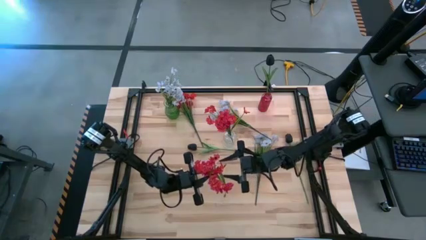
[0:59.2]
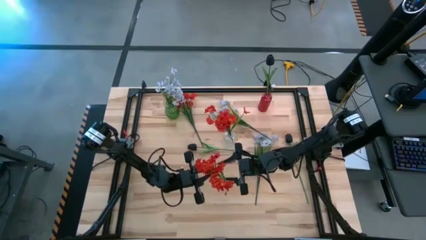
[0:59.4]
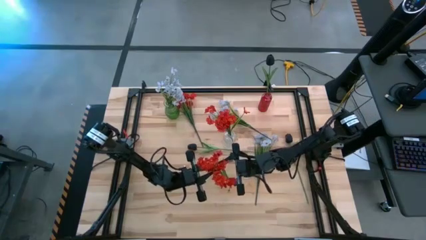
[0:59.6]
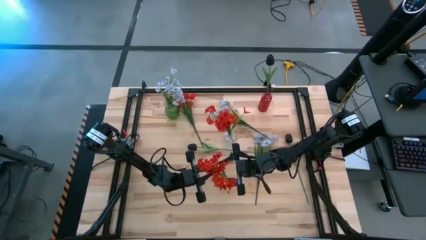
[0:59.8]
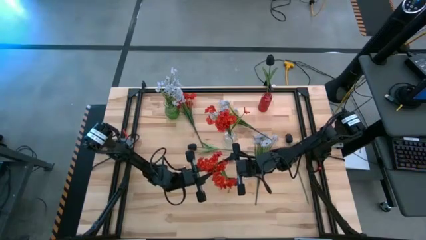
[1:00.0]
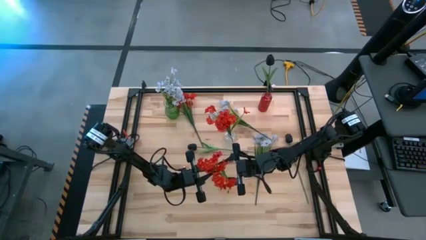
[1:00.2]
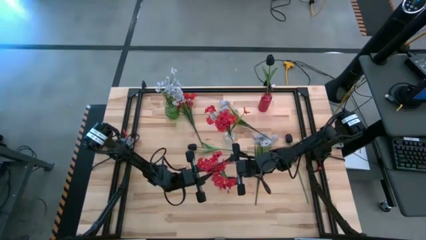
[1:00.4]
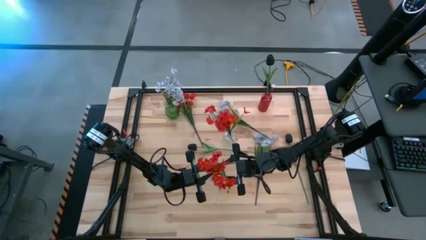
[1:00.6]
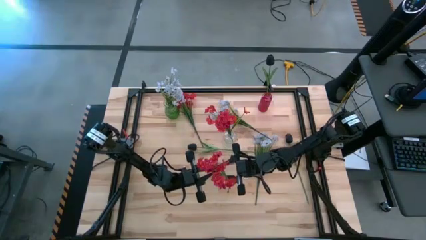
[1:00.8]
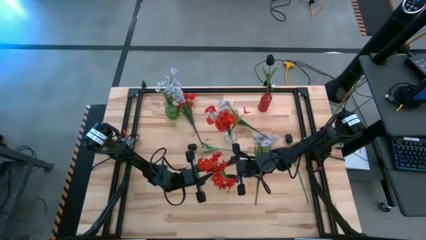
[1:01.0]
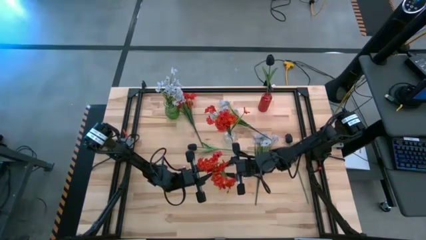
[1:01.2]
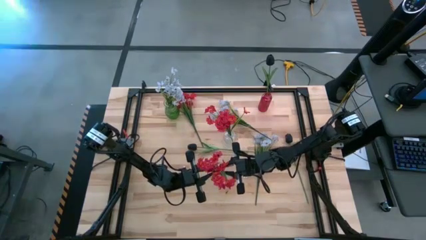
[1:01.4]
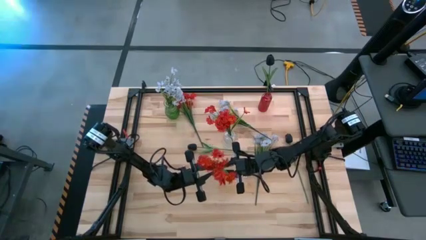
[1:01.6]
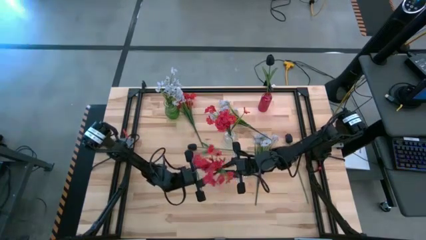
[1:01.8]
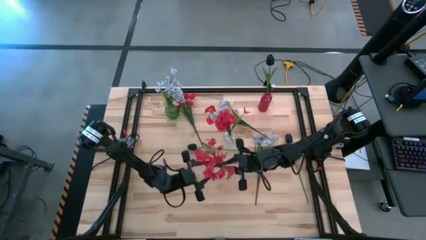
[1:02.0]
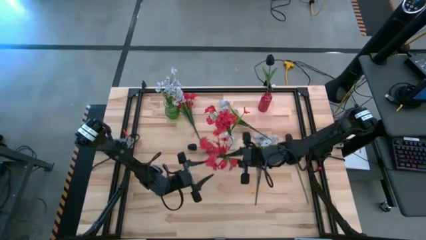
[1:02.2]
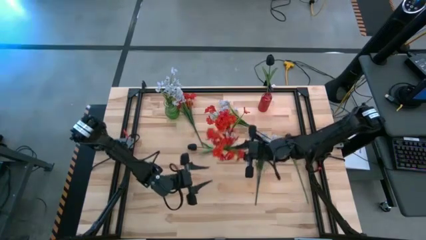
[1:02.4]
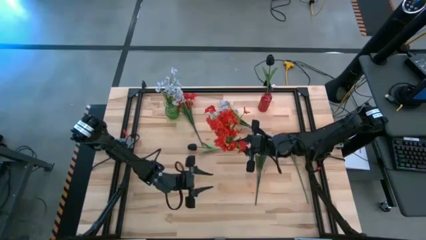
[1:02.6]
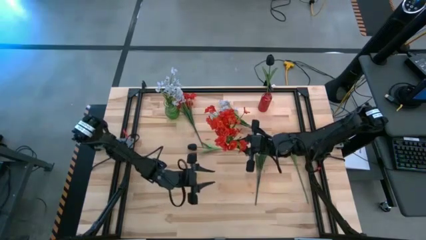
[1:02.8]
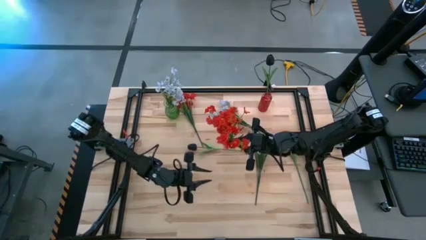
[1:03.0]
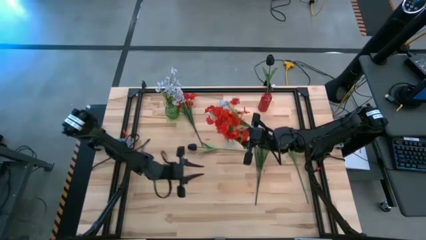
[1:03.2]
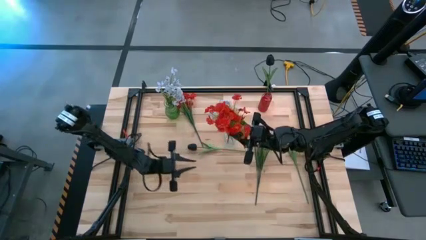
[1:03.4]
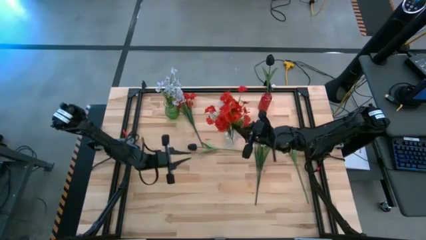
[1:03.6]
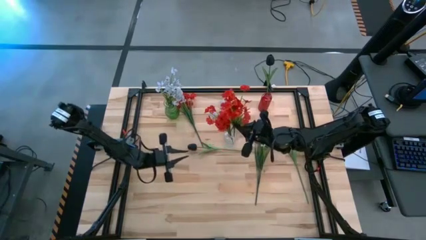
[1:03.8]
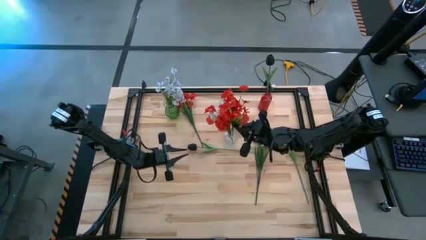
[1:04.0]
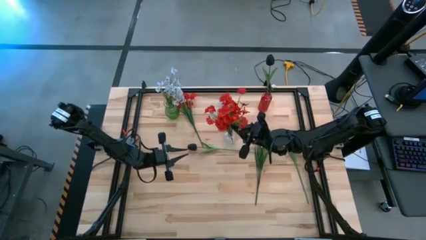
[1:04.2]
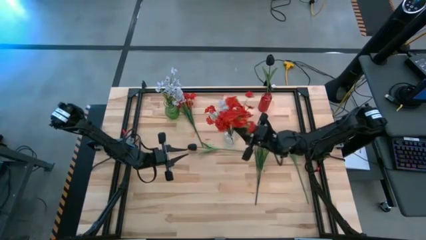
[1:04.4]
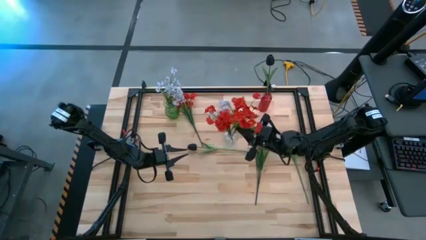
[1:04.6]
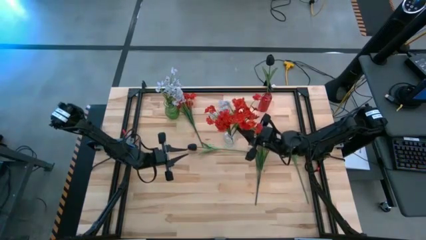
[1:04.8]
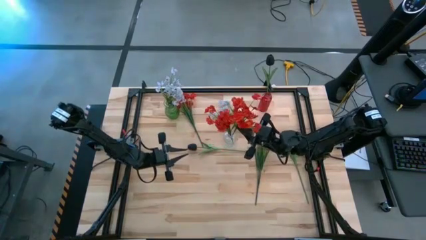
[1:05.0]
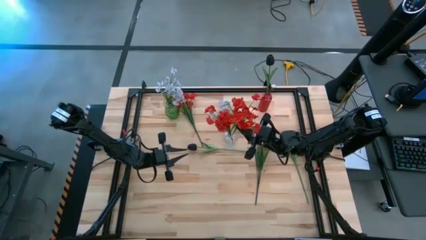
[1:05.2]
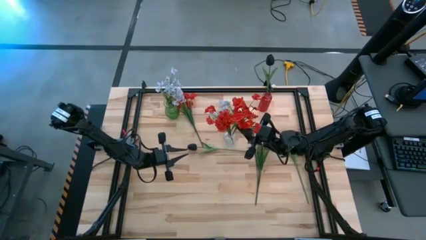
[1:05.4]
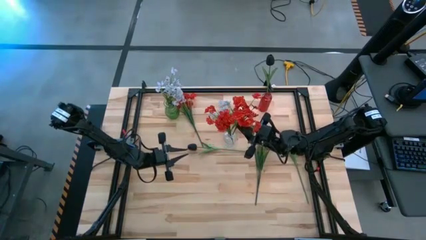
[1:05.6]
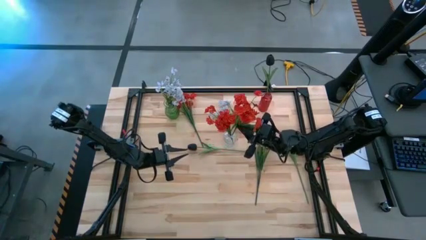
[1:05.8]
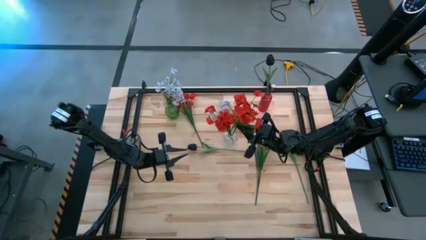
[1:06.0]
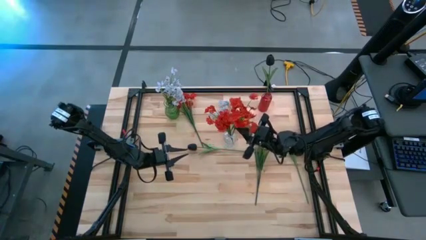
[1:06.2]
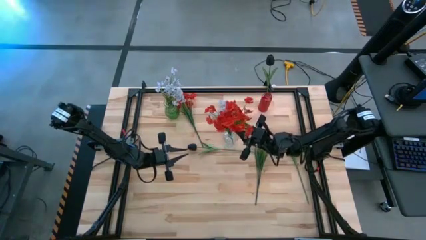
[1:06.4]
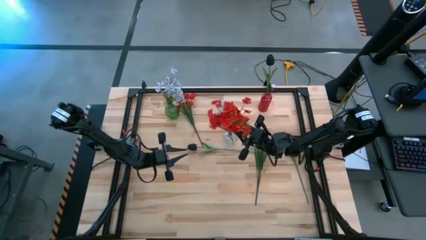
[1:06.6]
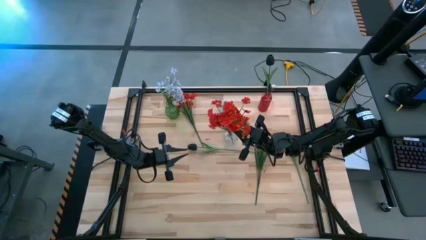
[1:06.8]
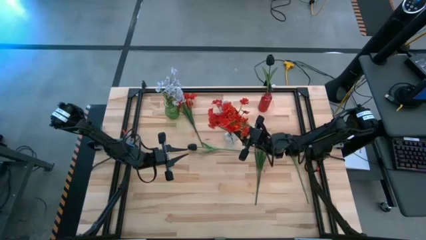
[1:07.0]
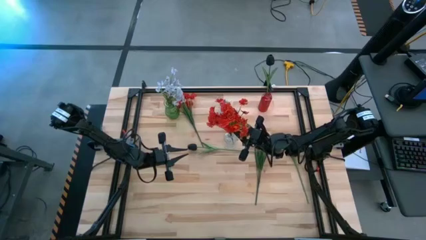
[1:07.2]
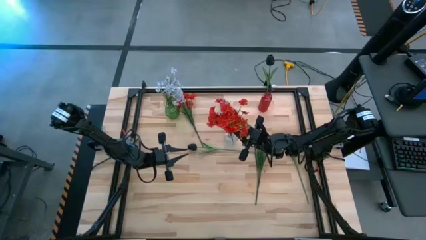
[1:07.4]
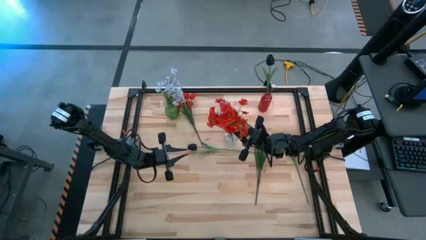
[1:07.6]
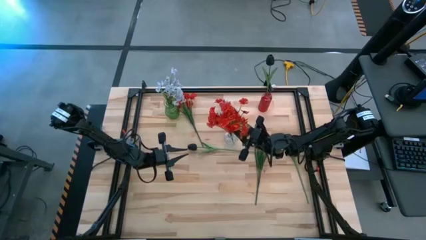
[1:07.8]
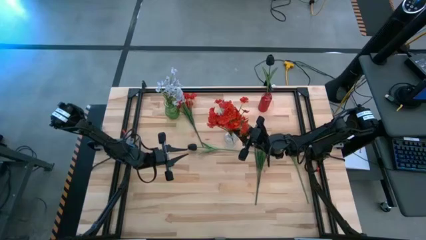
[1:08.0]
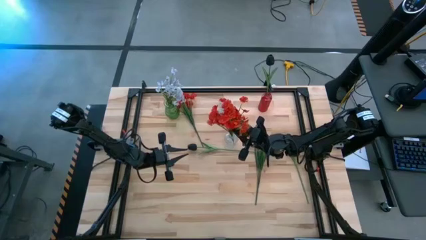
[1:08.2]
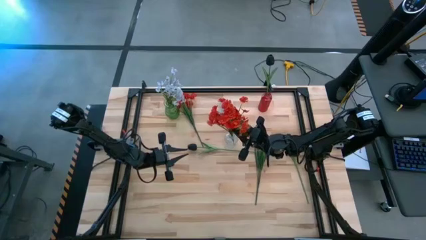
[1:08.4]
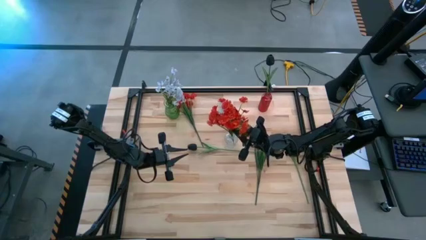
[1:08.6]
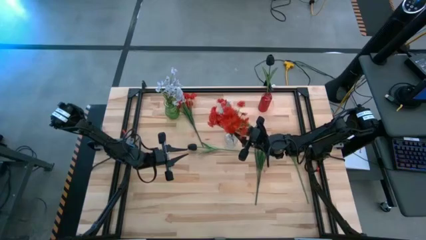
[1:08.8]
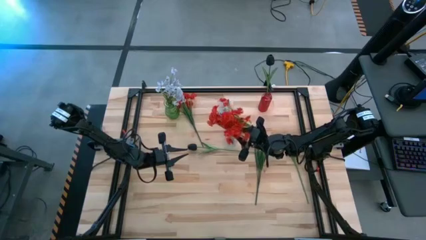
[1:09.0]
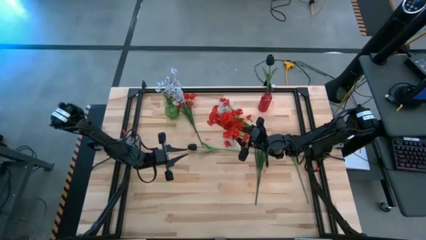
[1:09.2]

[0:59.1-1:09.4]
Task: Sort flowers into vase by color
Put the bottom red flower into the transparent vase
